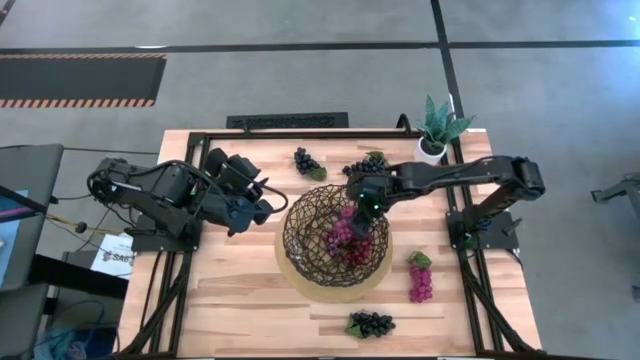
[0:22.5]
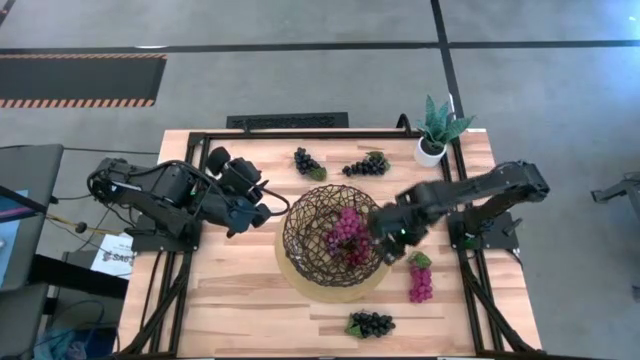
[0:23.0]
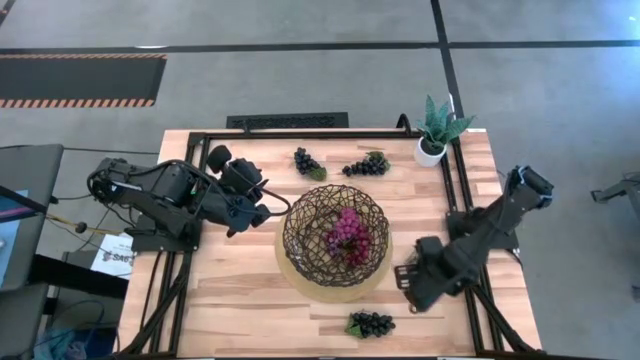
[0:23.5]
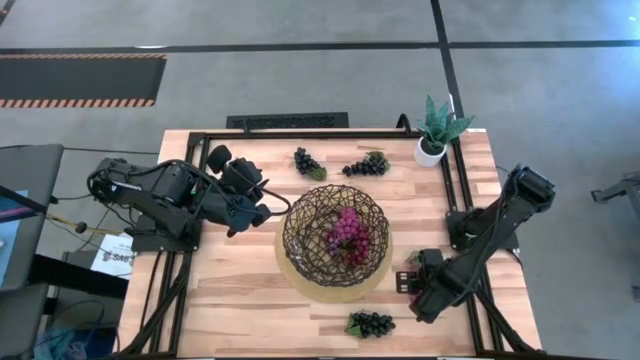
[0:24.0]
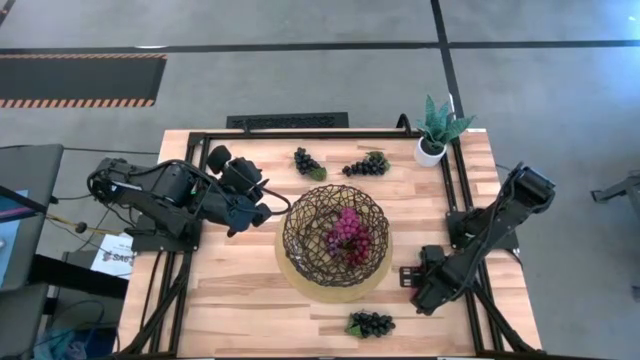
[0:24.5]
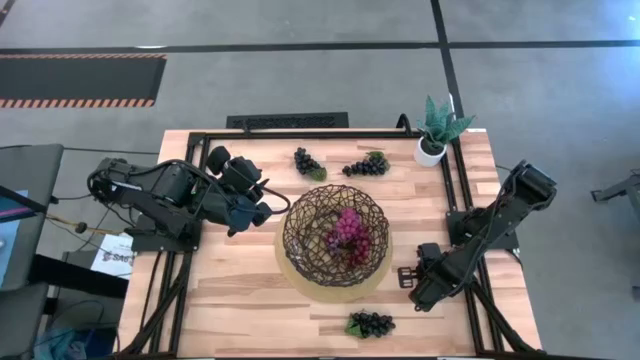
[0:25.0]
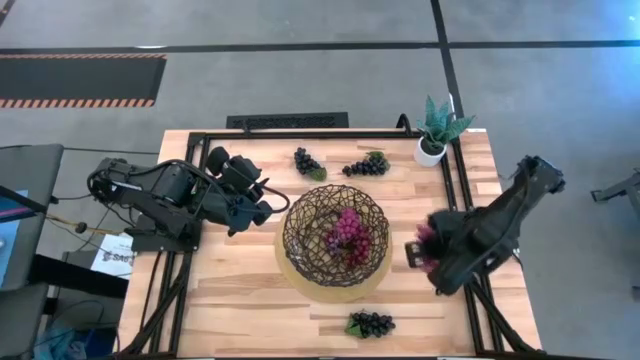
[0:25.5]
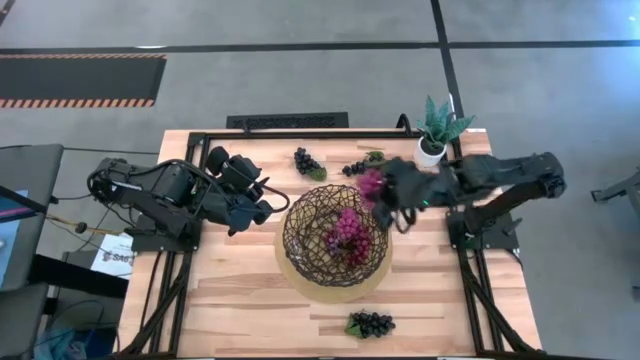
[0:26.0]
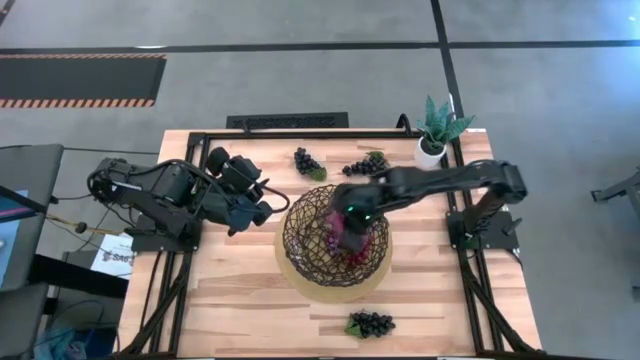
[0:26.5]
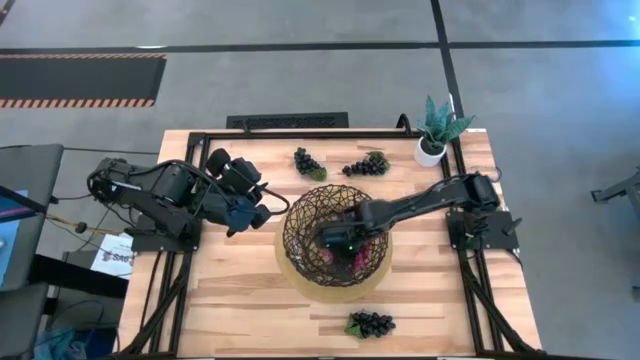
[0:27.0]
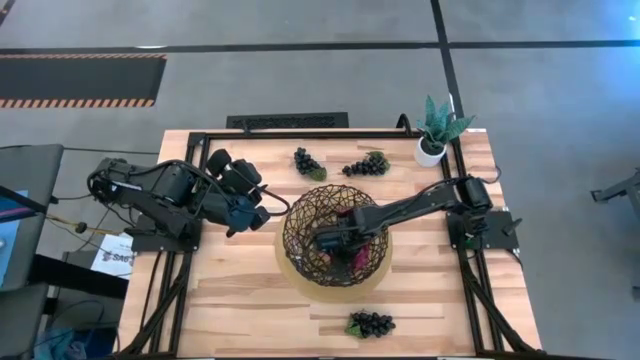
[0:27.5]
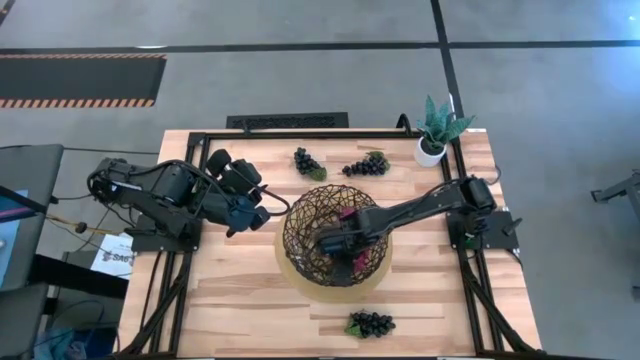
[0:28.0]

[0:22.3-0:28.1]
Task: Build produce basket
Put the pink grapes into the black wire basket

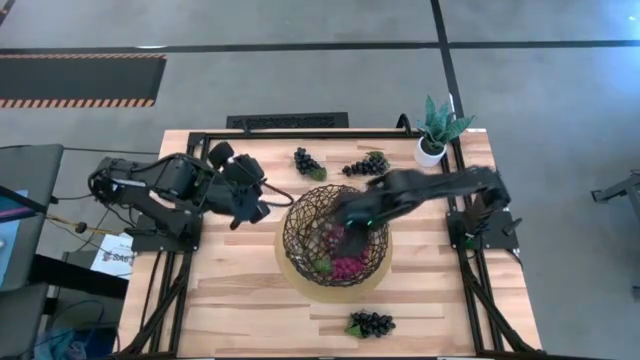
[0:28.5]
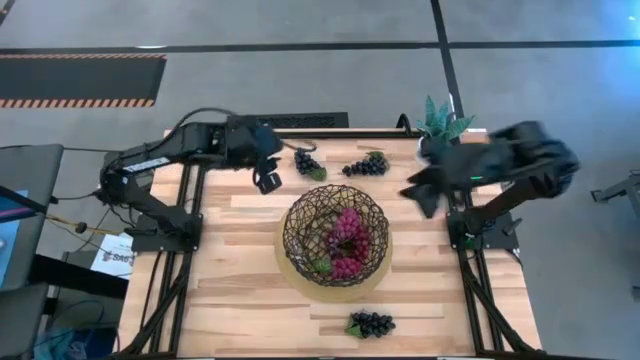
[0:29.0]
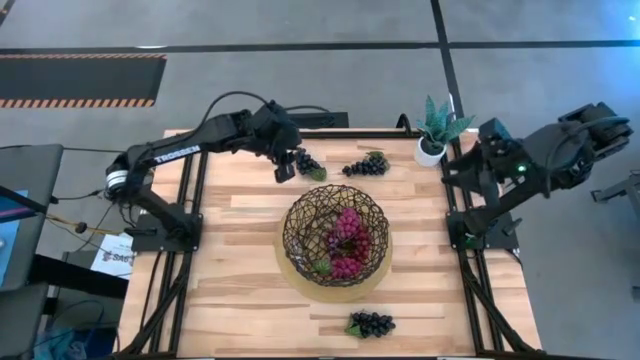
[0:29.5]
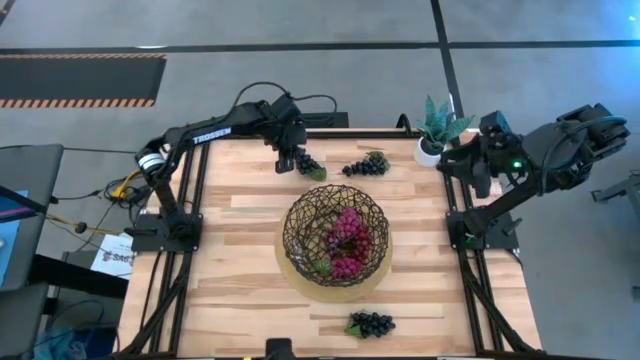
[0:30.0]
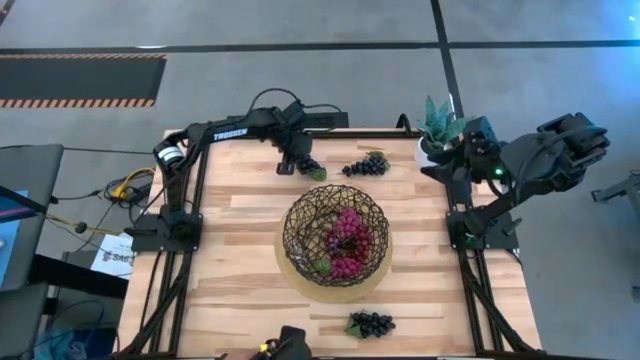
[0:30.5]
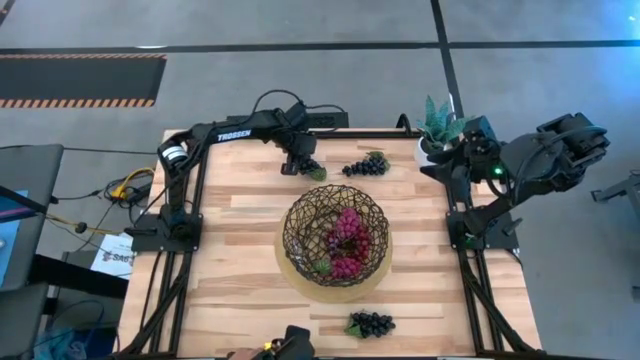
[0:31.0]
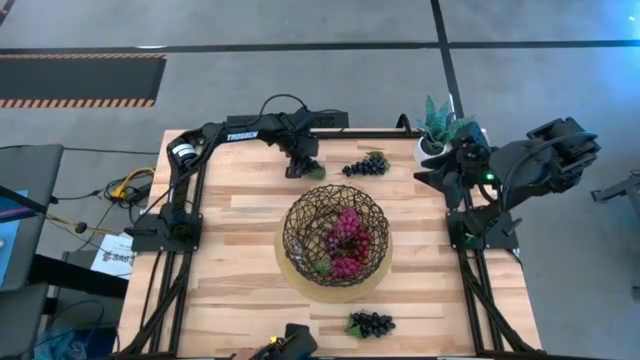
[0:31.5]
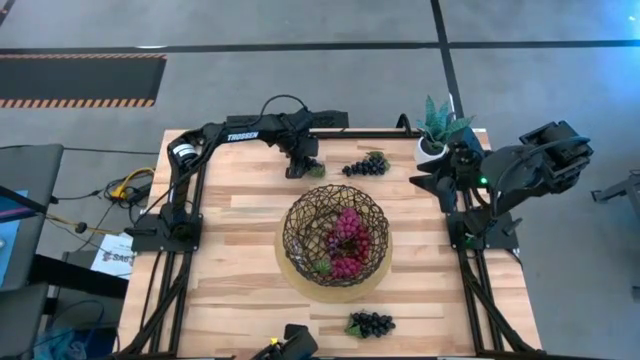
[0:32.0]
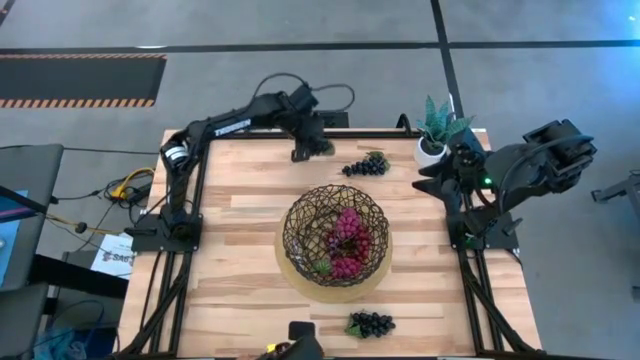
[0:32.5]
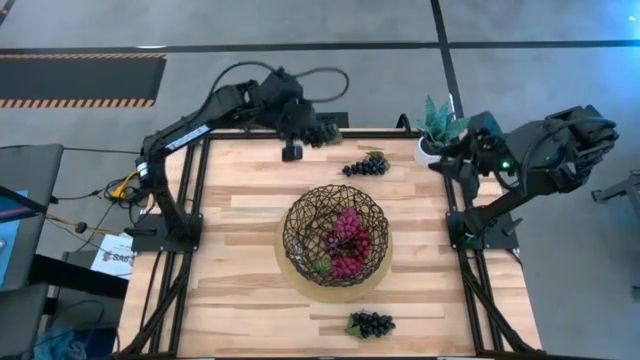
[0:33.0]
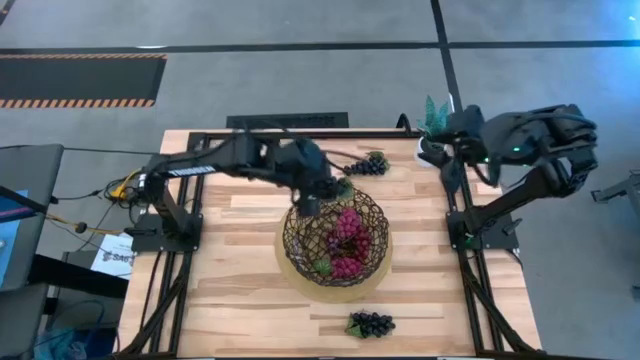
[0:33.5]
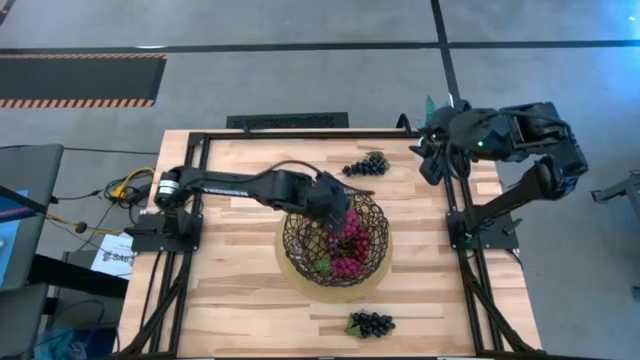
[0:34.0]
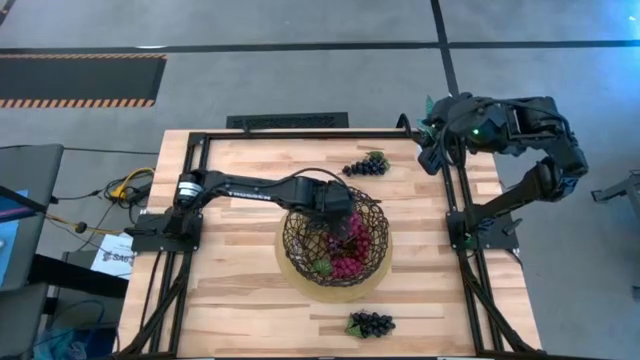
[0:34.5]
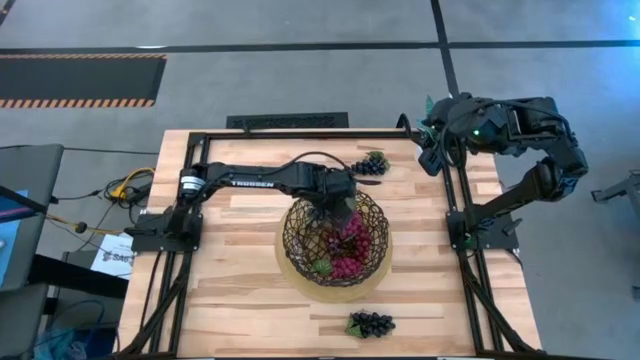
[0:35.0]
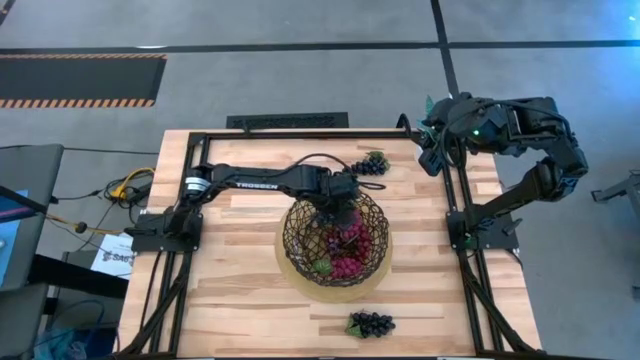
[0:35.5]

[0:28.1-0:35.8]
Put the top left black grapes into the black wire basket

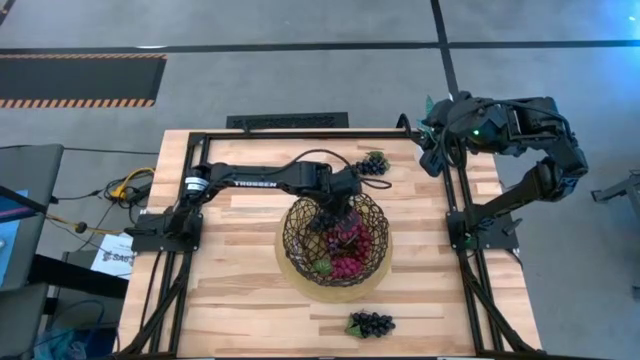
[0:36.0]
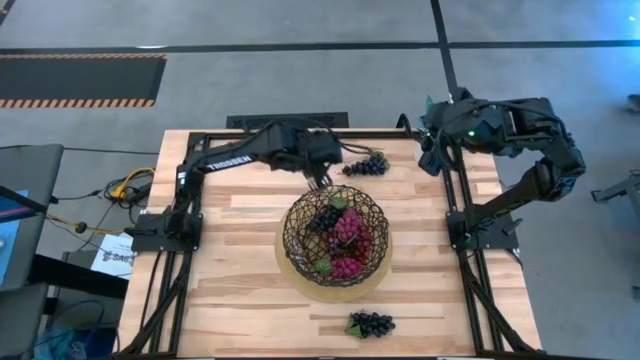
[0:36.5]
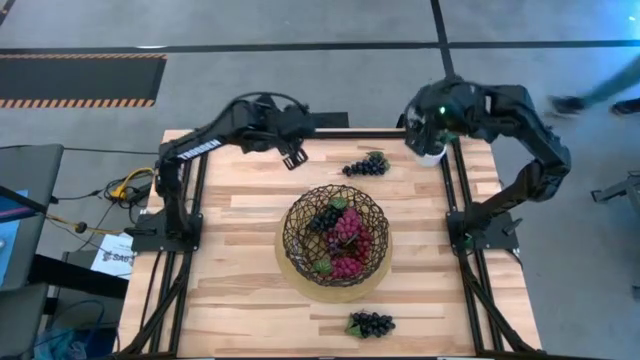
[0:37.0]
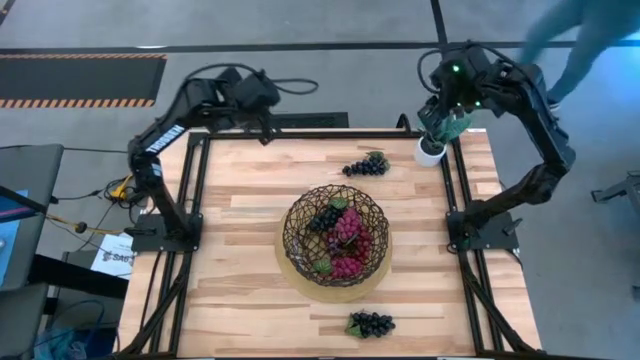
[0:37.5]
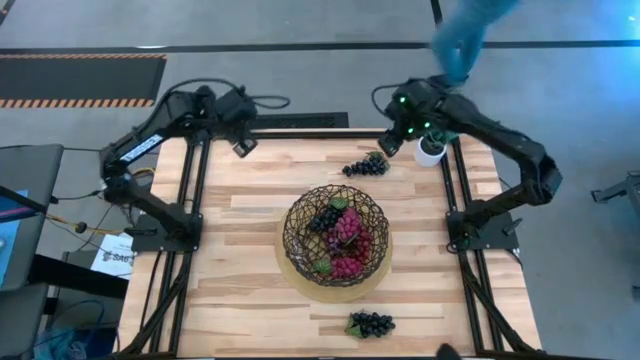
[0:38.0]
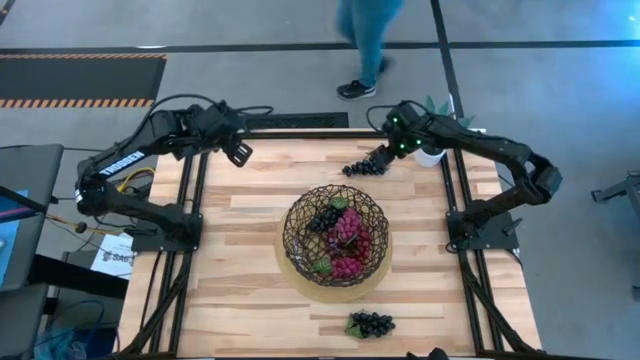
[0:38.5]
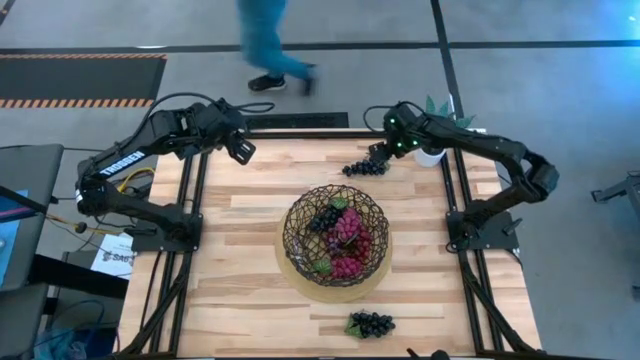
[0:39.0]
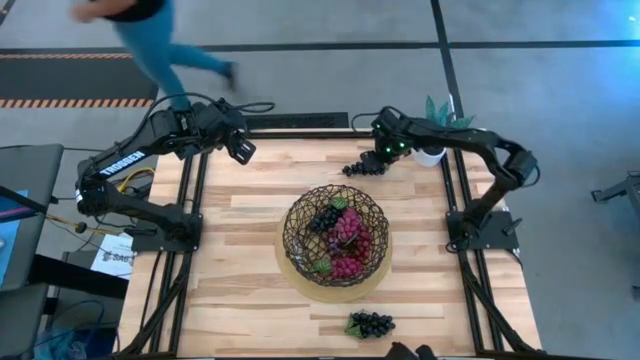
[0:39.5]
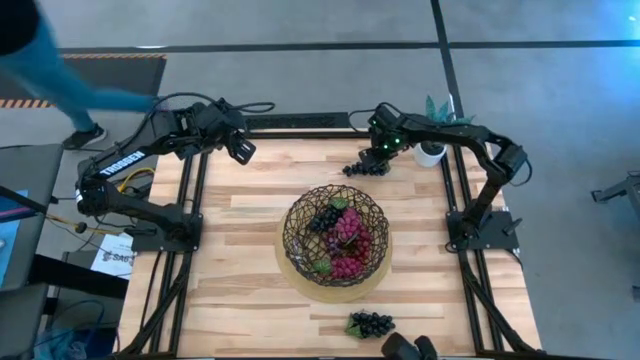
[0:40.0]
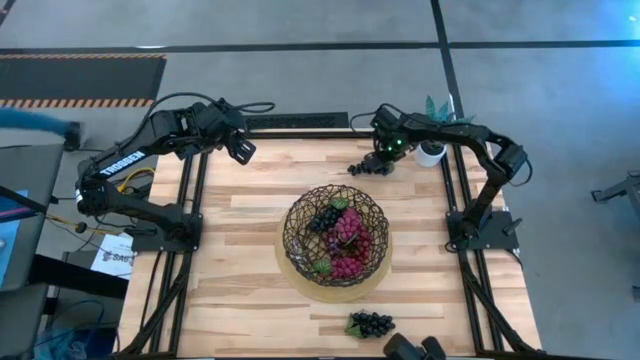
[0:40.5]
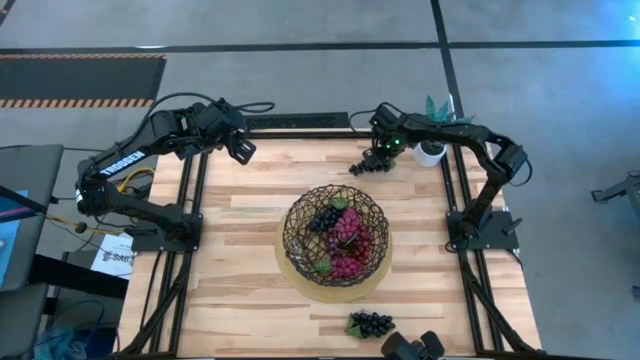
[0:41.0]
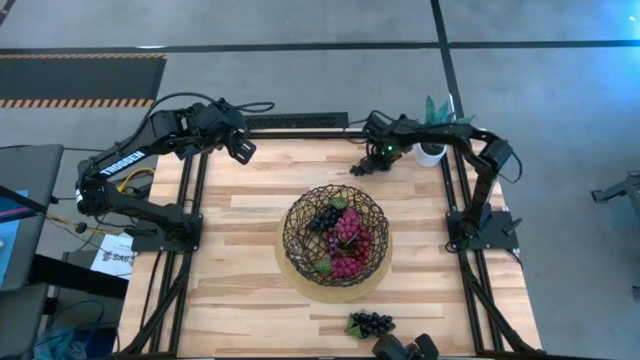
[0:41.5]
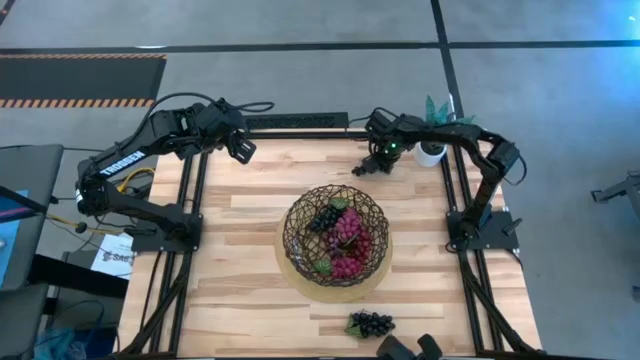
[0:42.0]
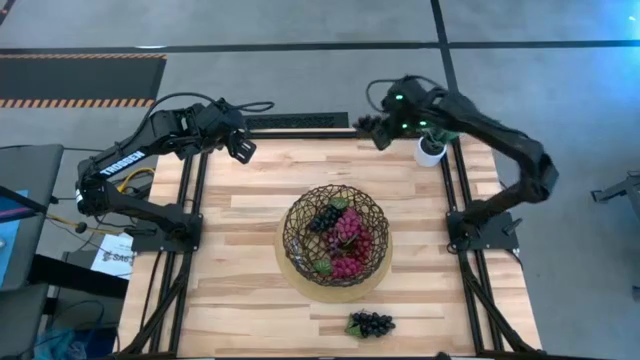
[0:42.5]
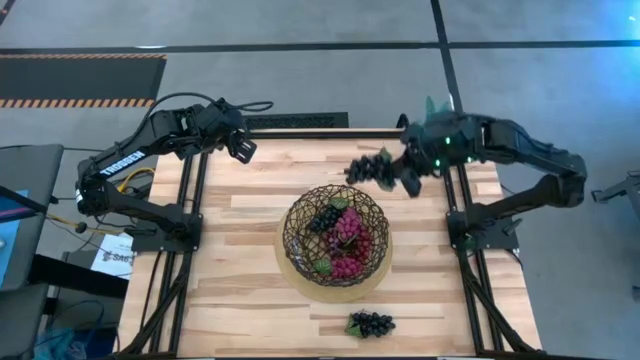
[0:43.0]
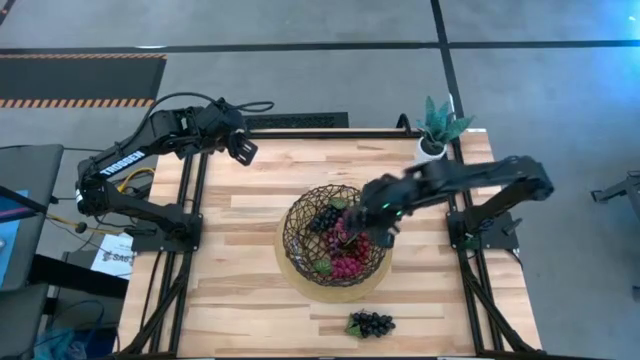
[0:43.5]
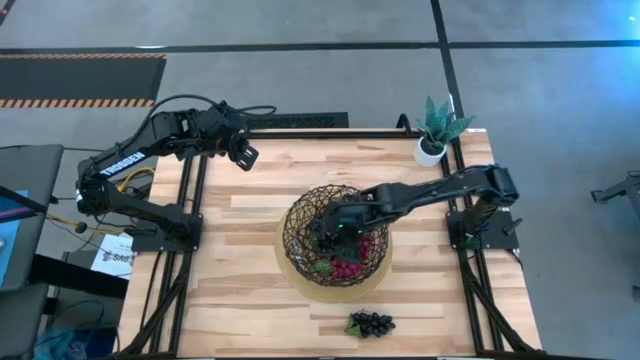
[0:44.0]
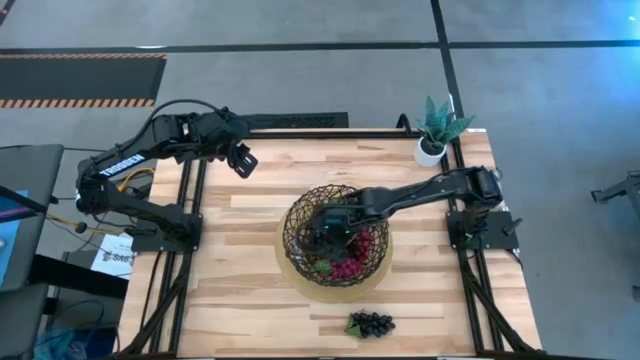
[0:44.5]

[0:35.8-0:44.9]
Put the top black grapes into the black wire basket
